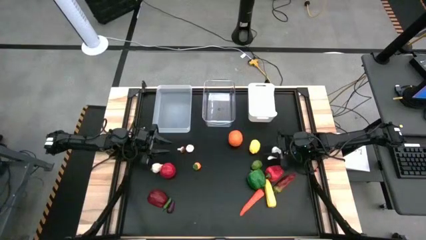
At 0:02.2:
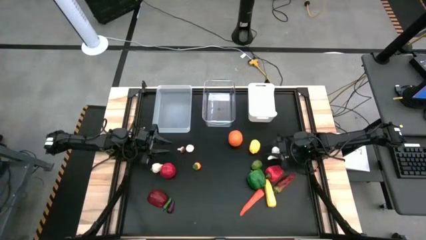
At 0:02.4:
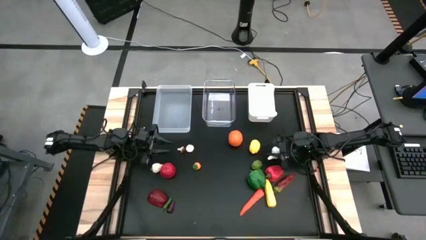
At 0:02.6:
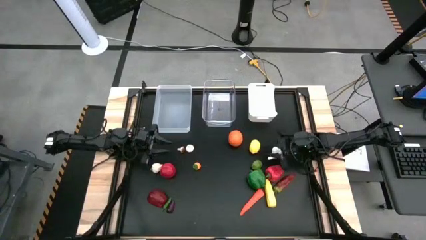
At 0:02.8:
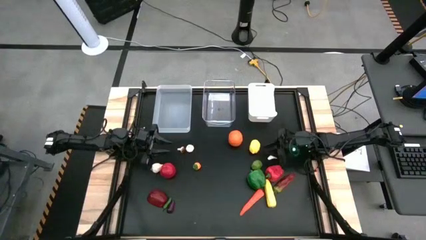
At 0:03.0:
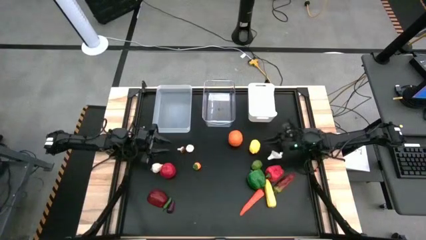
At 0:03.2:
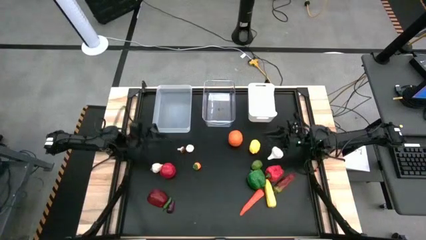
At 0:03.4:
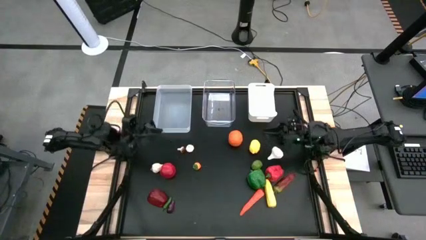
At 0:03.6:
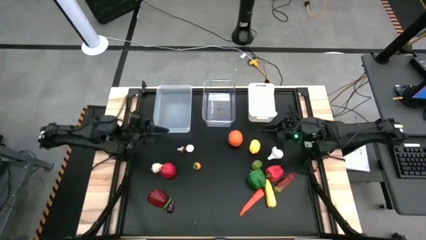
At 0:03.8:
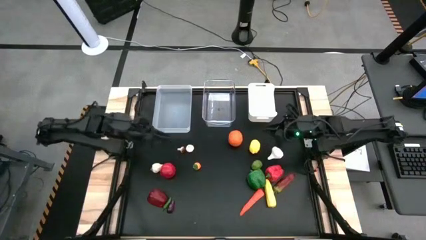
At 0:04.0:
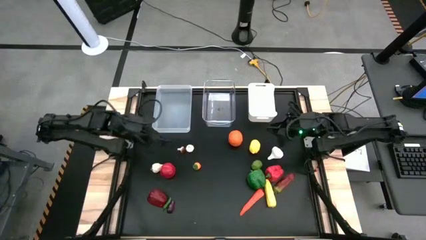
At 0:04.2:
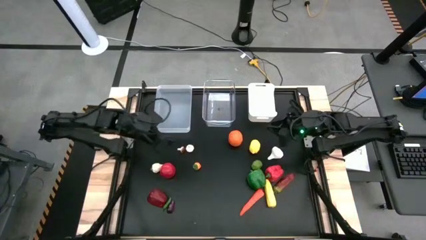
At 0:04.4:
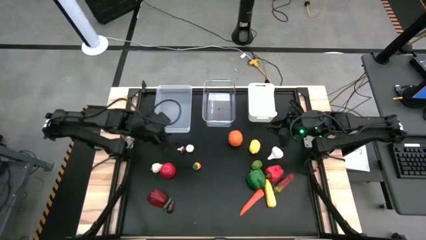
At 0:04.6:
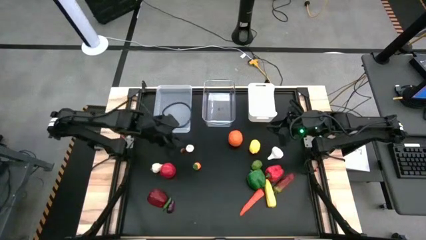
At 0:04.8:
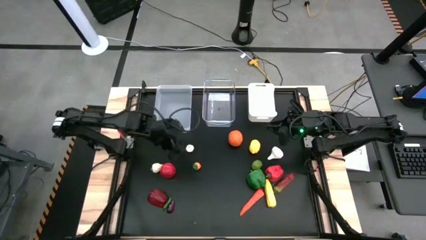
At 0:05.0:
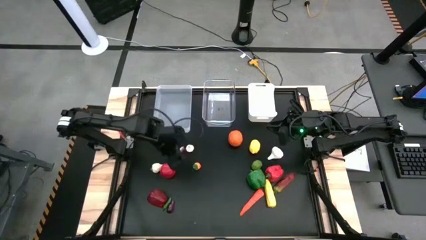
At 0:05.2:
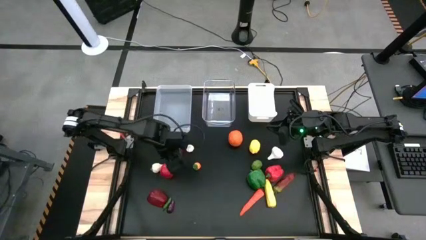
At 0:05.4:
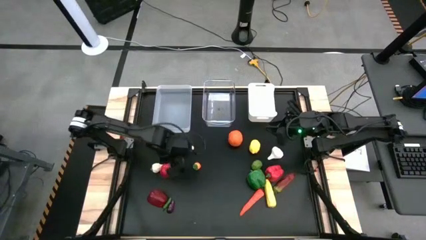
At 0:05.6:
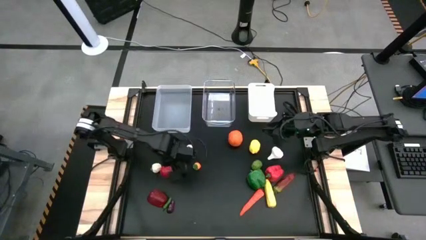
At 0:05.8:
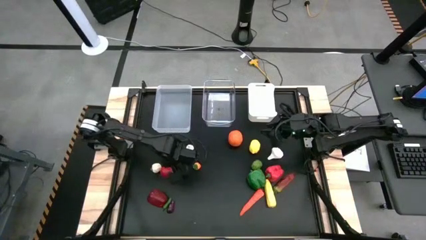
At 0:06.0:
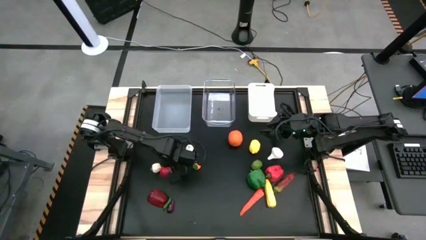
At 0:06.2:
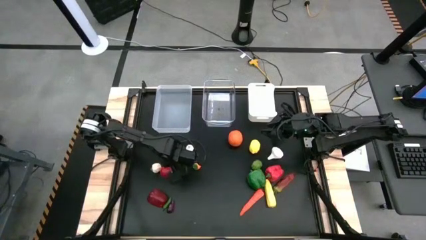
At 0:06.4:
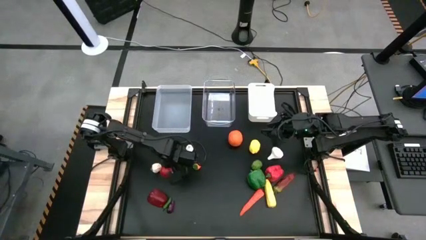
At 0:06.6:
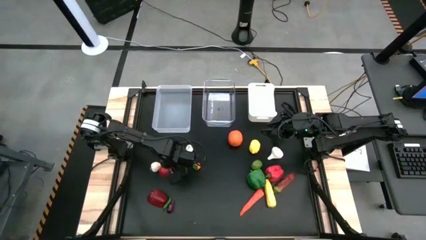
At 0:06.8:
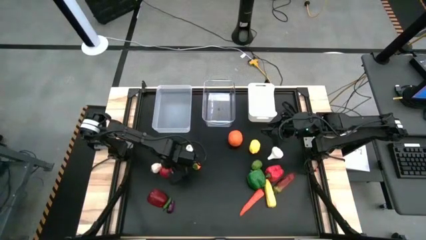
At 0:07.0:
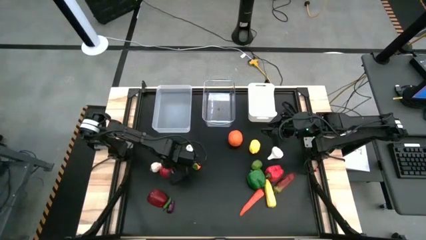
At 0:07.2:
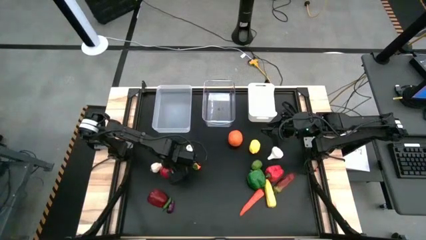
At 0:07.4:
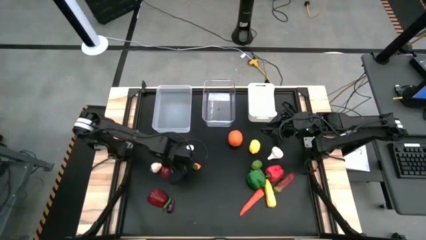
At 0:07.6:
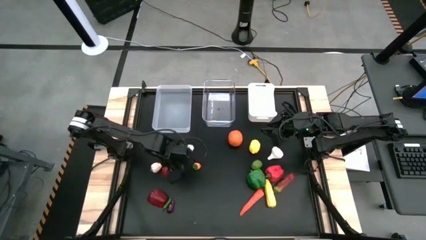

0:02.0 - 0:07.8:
Task: Sort produce into baskets
Put the red tomato into the right transparent bin

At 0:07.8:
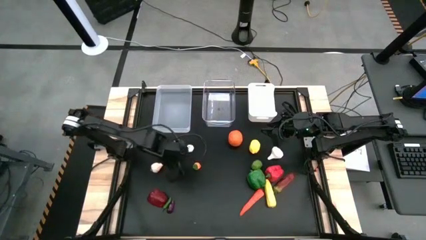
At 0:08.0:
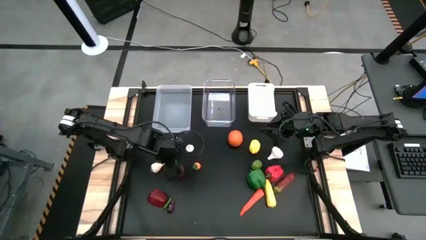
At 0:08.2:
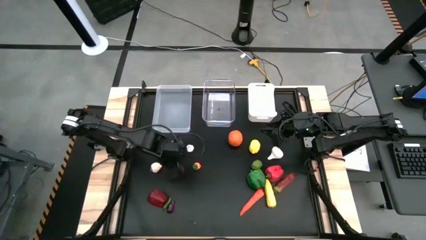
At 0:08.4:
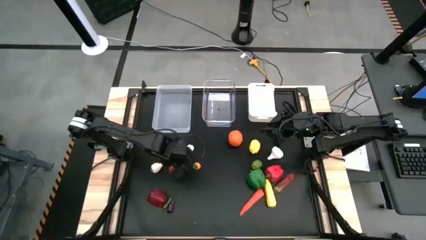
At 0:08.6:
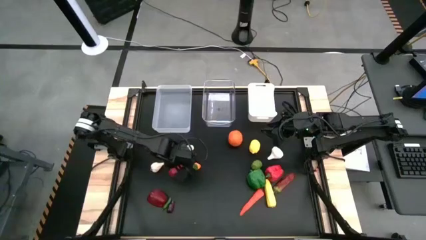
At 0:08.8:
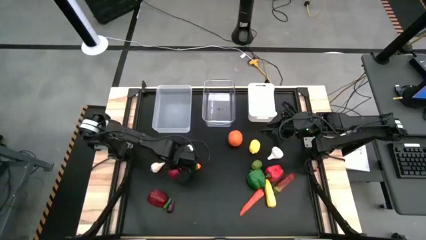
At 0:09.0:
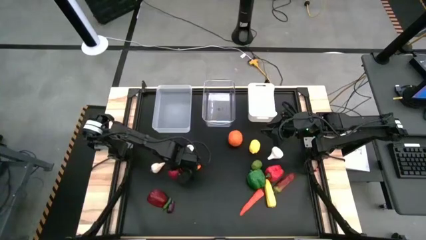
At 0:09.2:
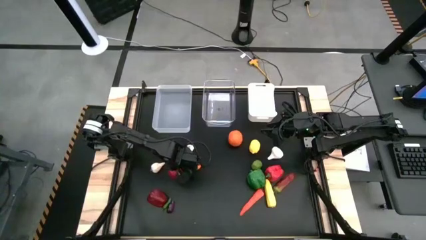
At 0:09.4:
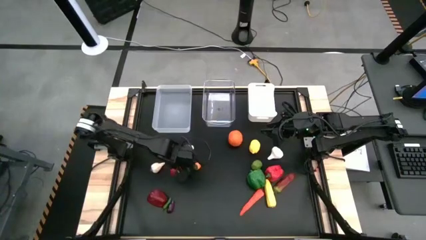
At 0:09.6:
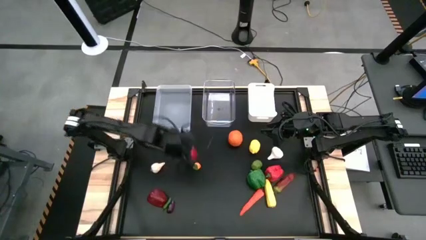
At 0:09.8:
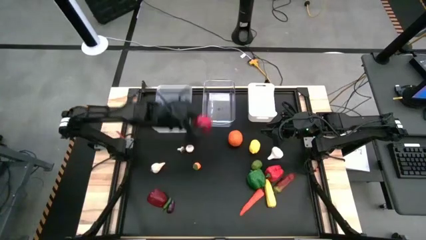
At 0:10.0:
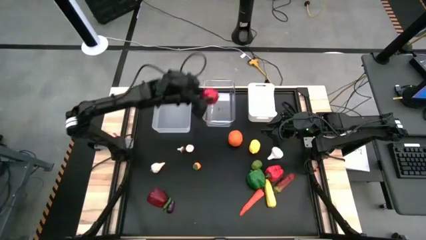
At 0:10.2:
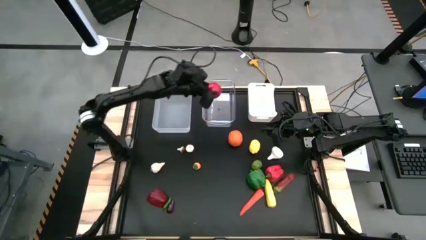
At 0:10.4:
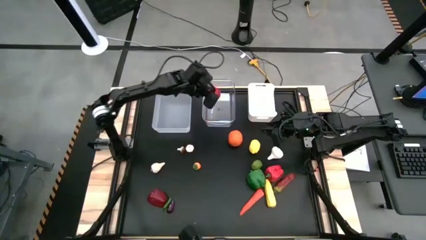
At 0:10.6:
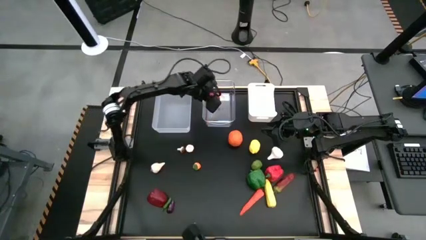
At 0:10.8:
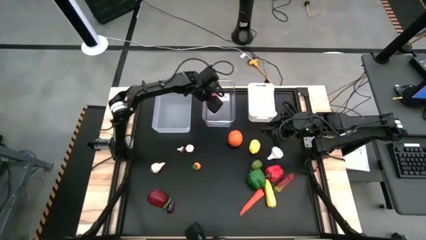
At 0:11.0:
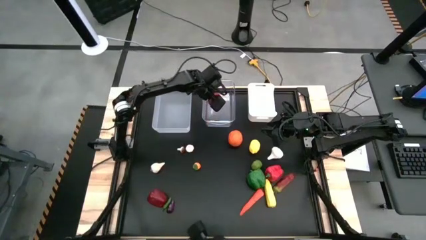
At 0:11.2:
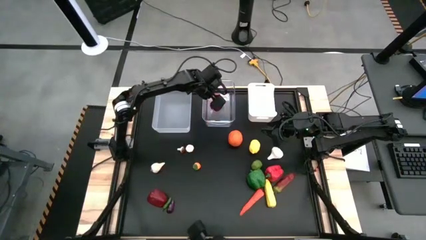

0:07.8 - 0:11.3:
Put the red tomato into the right transparent bin

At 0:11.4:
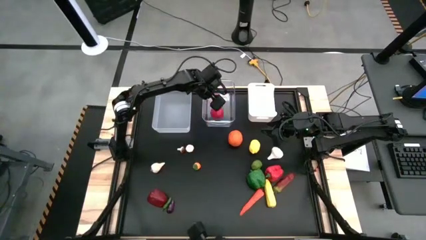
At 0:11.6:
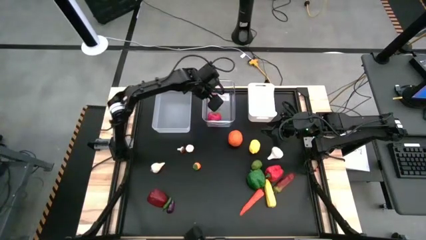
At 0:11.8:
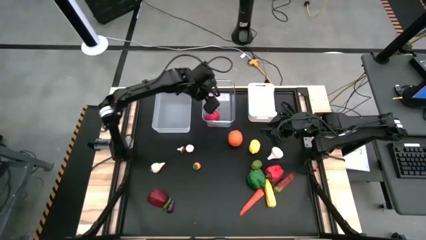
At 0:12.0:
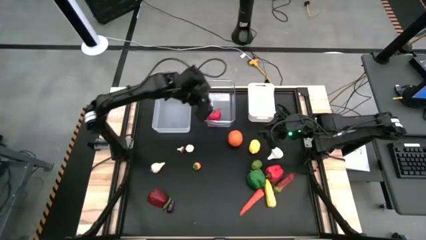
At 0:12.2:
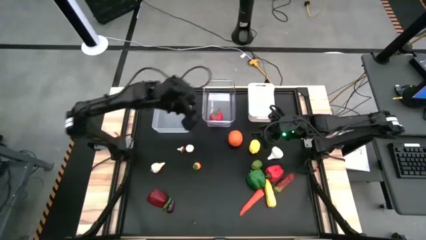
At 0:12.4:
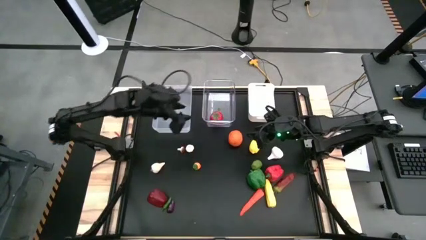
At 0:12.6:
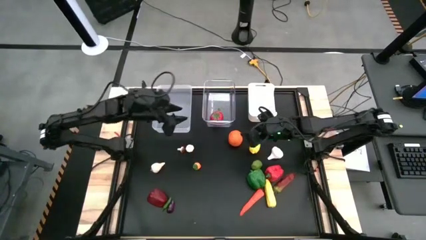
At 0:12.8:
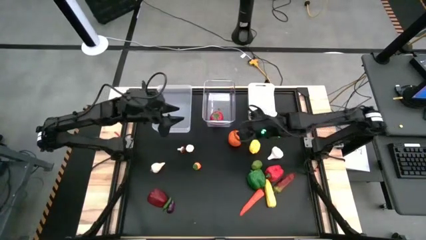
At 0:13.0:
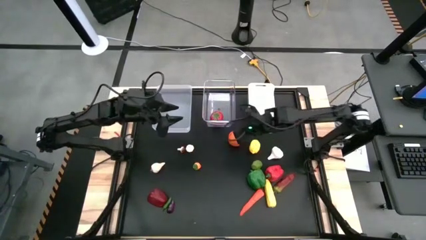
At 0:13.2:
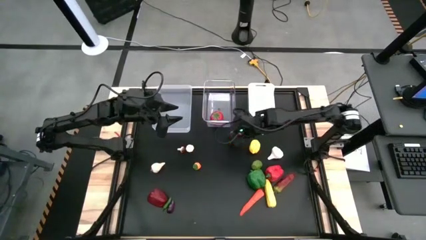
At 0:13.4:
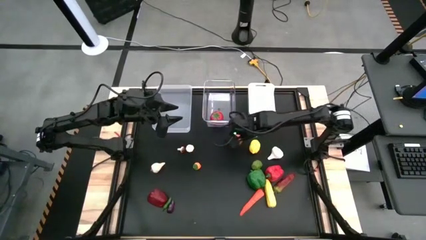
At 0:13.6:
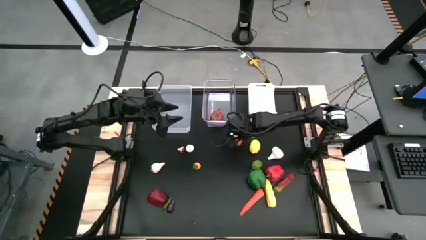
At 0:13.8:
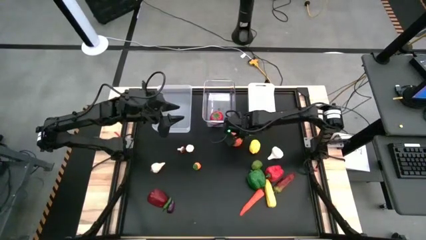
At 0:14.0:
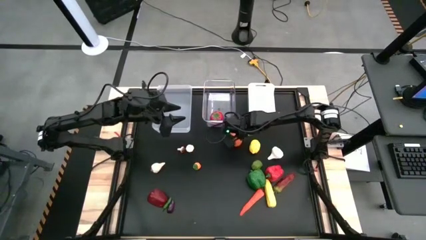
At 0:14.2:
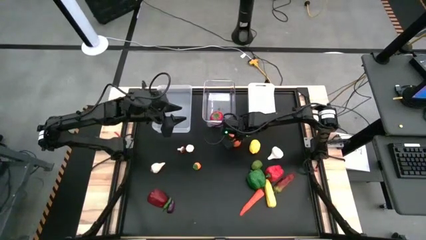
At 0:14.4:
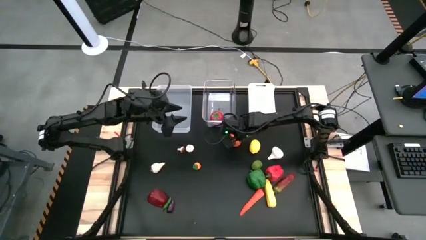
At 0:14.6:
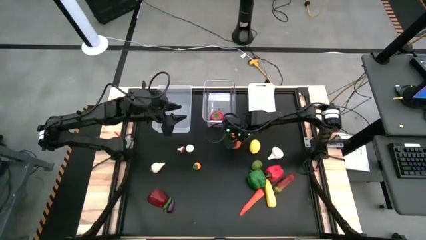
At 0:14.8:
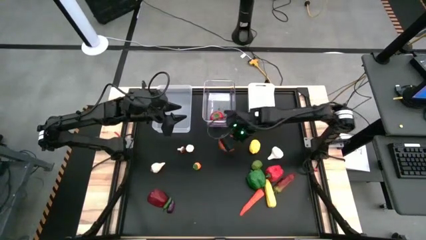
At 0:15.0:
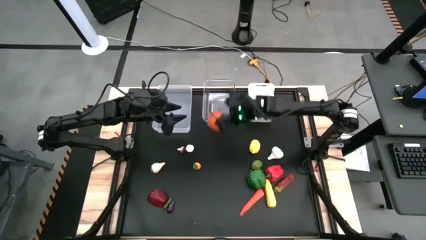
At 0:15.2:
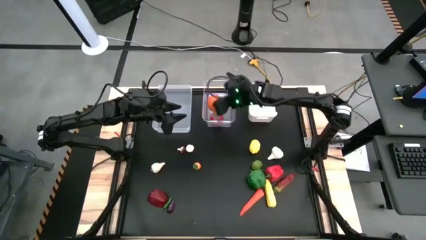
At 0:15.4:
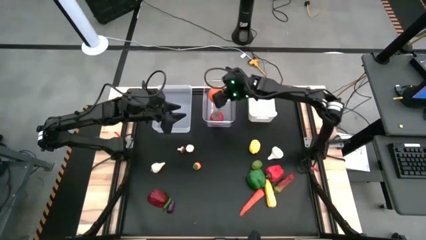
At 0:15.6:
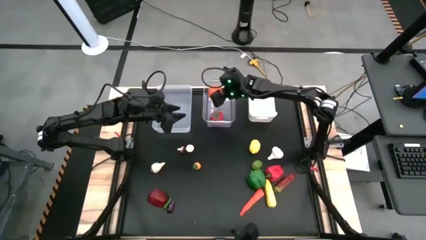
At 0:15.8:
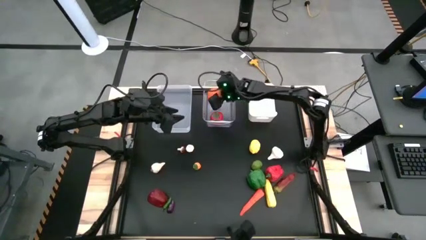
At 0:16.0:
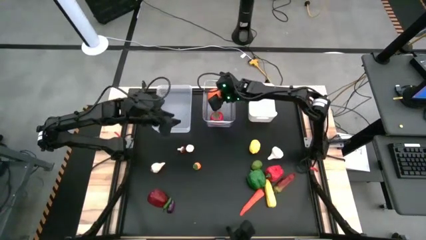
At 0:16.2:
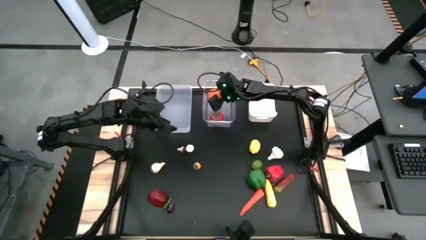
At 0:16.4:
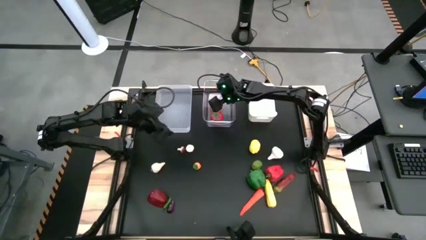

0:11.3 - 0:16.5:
Put the orange into the right transparent bin

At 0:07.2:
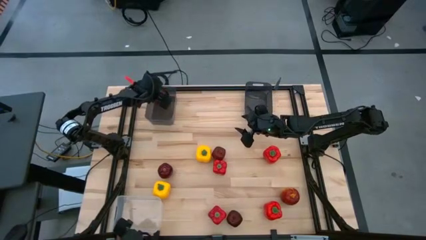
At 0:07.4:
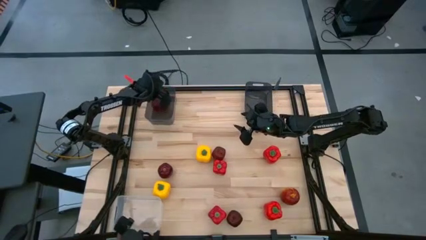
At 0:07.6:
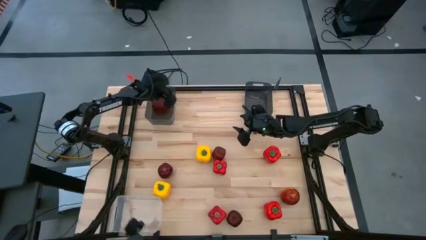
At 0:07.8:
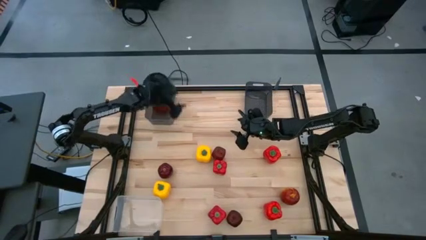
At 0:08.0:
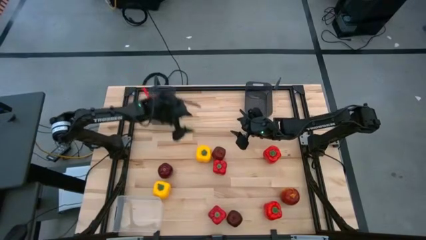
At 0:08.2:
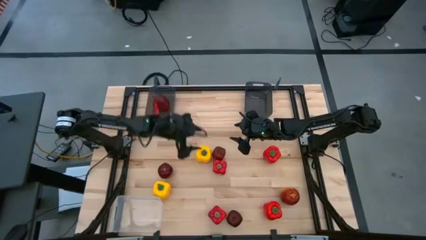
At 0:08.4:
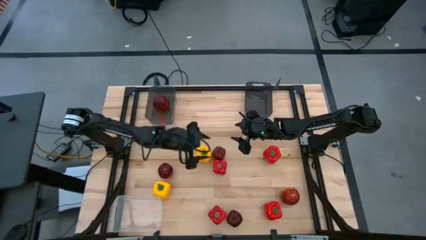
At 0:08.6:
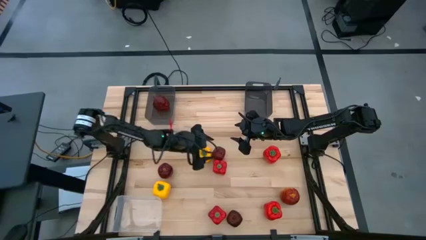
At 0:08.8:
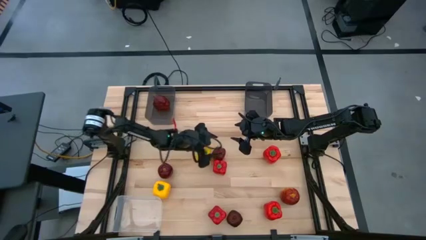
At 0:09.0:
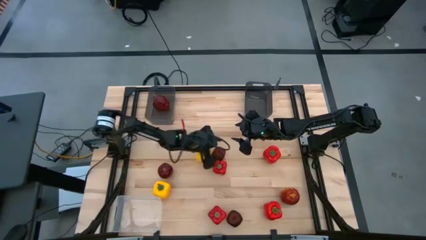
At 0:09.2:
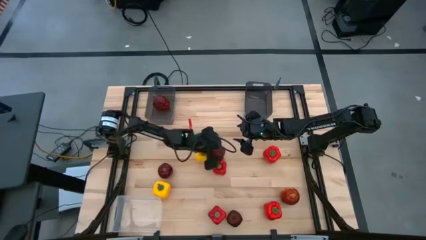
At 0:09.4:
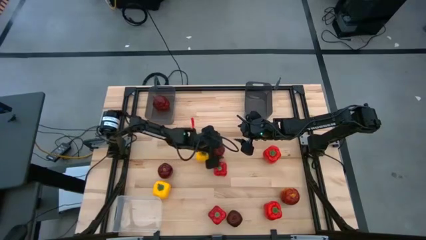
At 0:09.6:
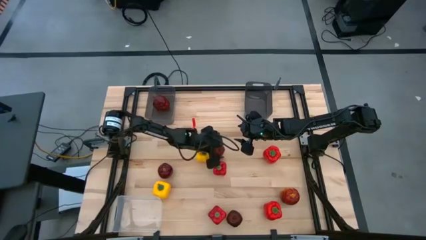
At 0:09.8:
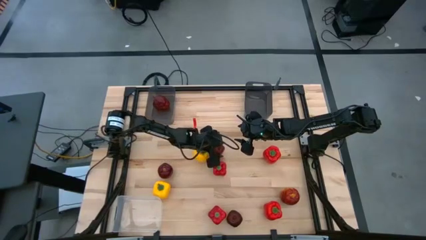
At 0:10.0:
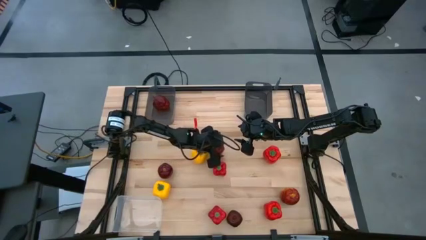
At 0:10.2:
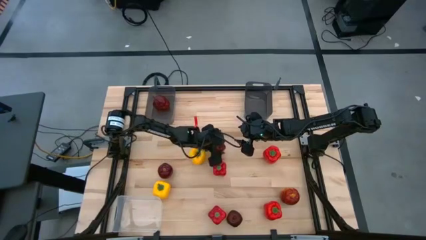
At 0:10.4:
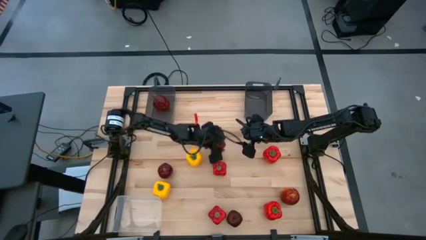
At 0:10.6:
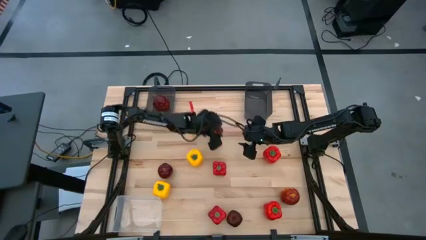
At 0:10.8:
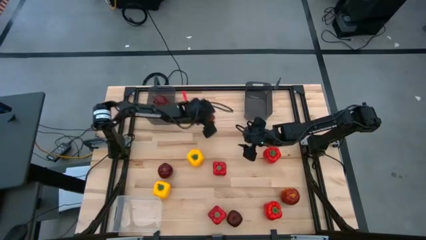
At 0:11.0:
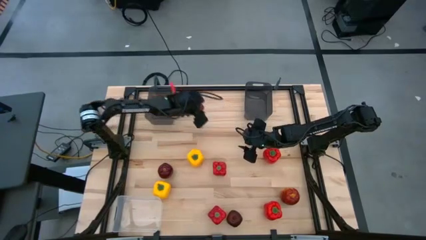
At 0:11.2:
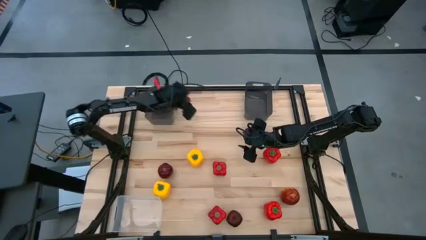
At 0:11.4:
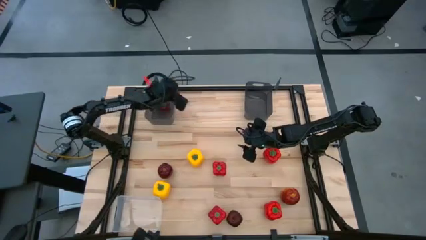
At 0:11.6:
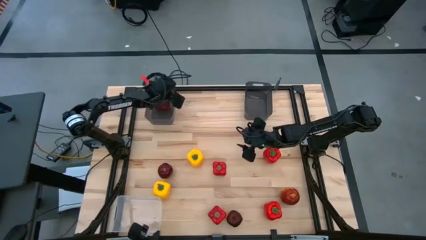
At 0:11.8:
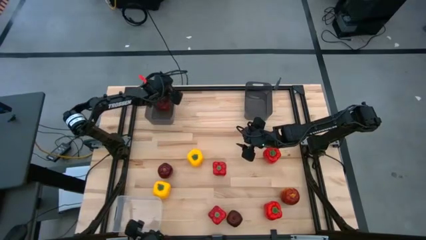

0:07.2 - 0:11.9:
Task: Sort produce into baskets
Put the red apple into the left black bin
